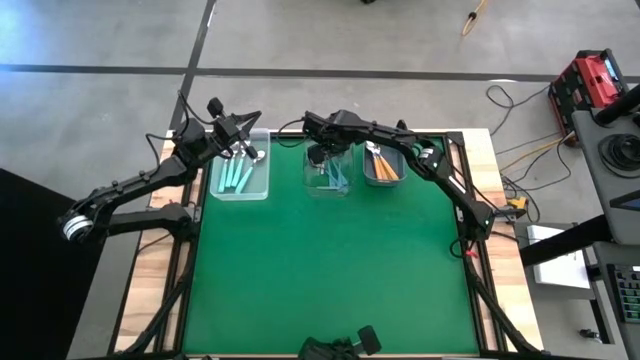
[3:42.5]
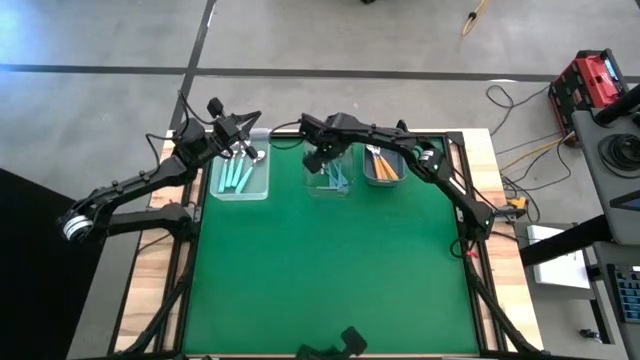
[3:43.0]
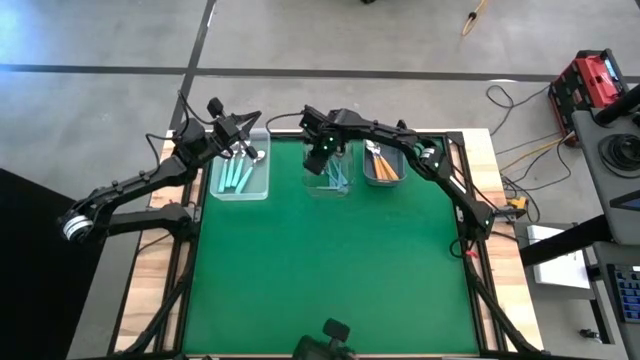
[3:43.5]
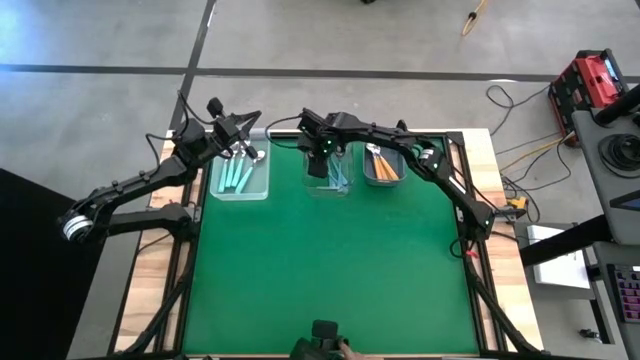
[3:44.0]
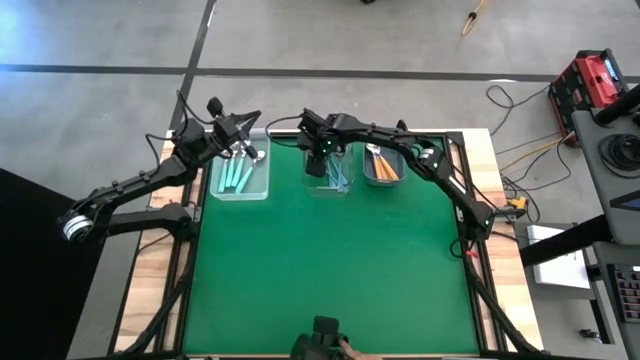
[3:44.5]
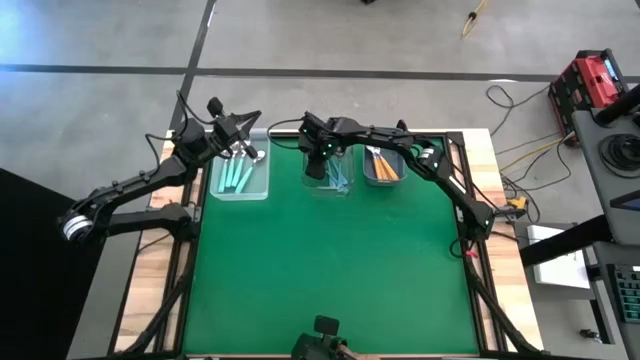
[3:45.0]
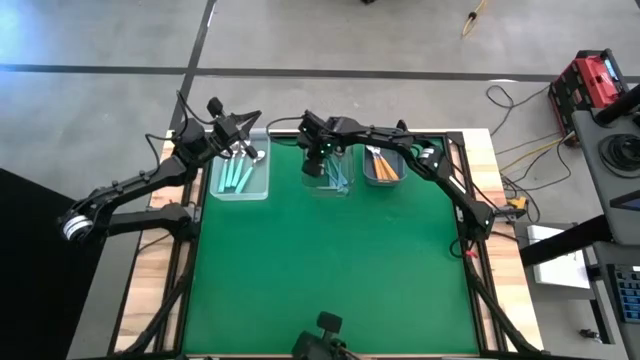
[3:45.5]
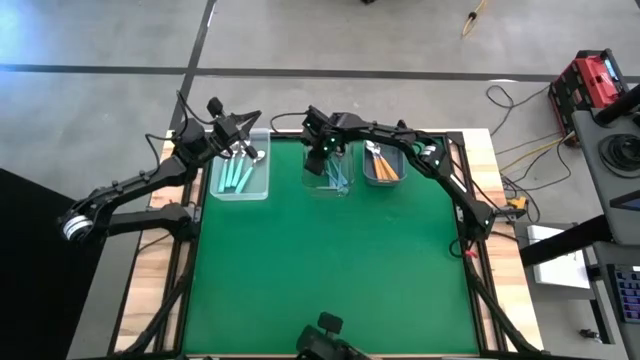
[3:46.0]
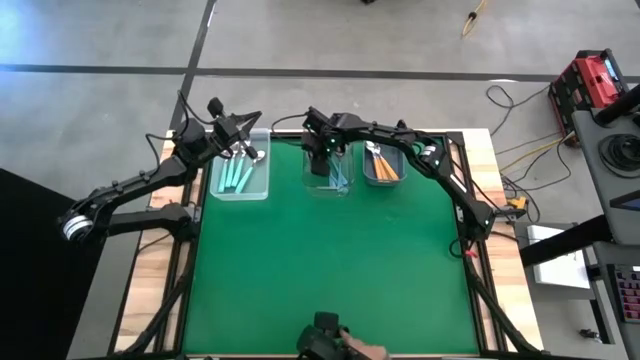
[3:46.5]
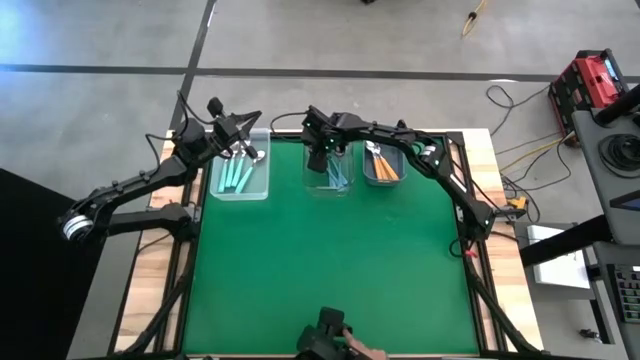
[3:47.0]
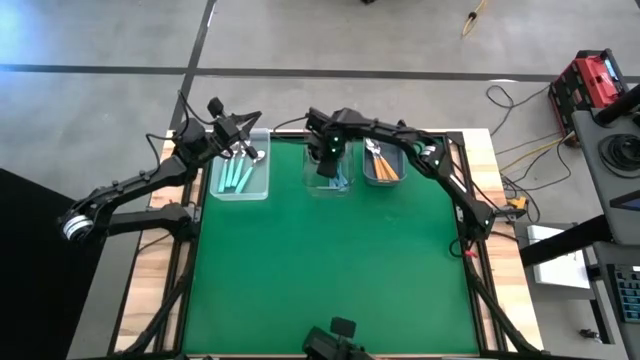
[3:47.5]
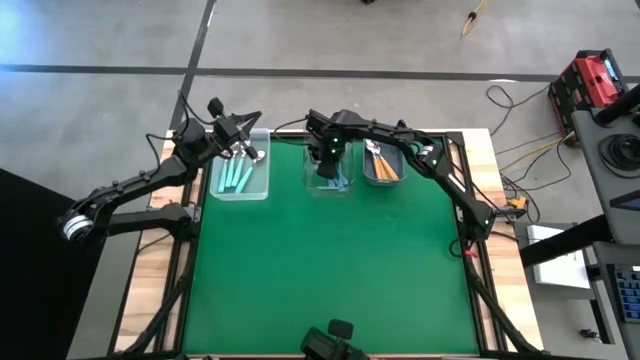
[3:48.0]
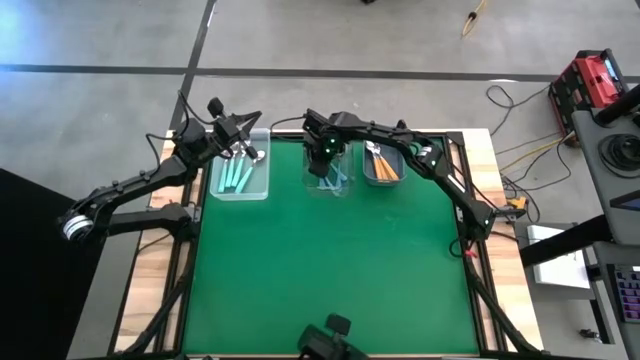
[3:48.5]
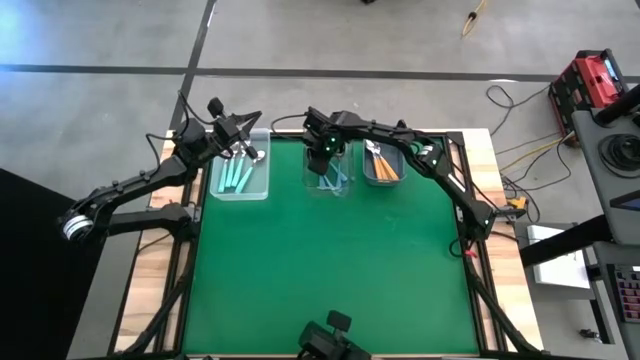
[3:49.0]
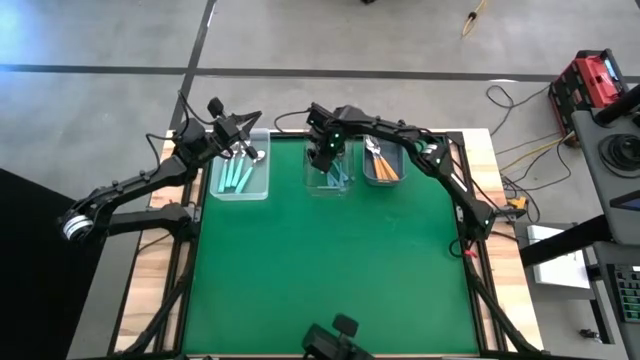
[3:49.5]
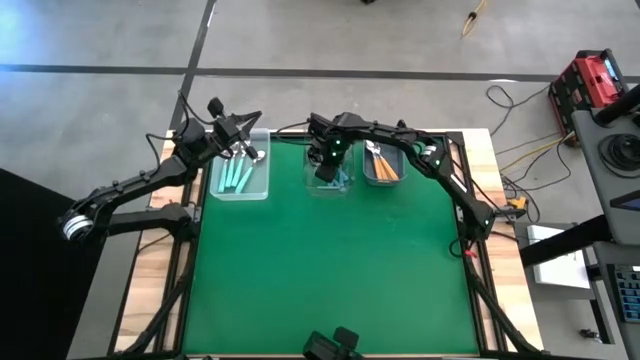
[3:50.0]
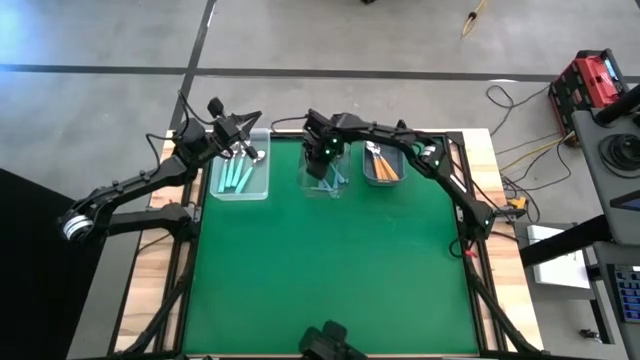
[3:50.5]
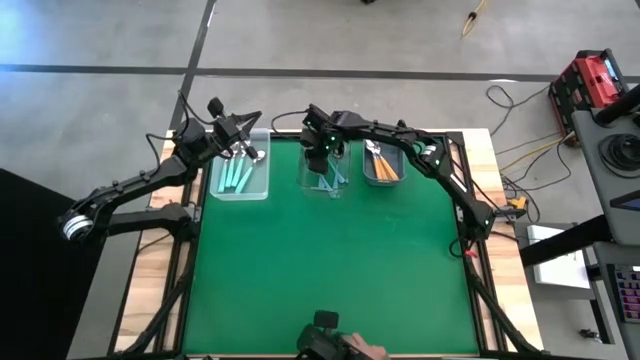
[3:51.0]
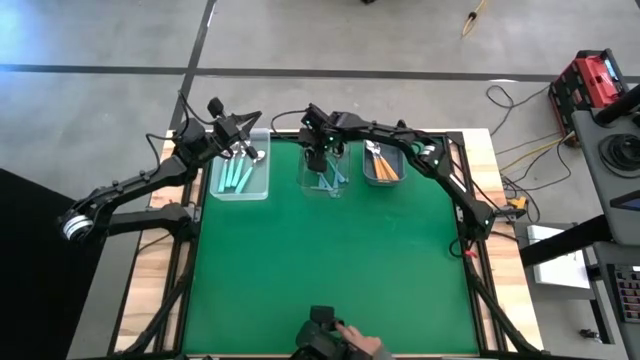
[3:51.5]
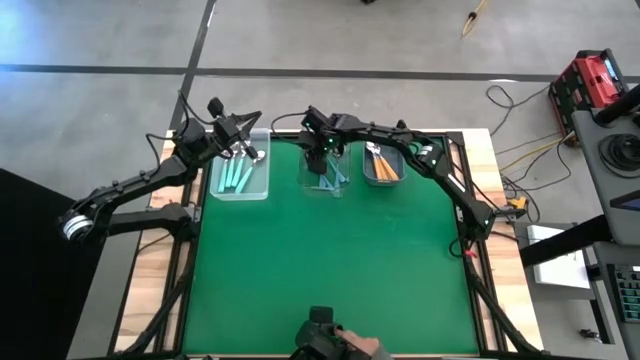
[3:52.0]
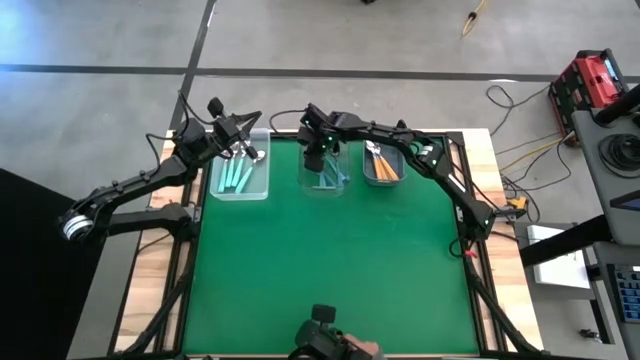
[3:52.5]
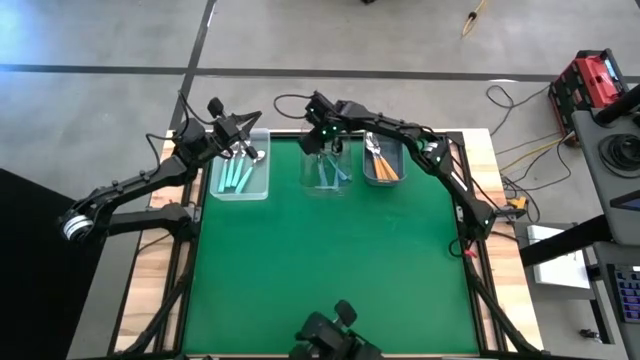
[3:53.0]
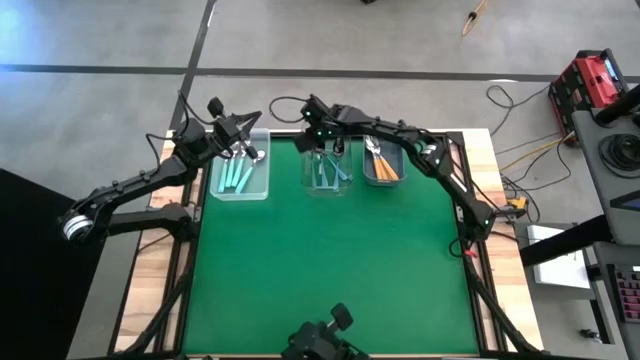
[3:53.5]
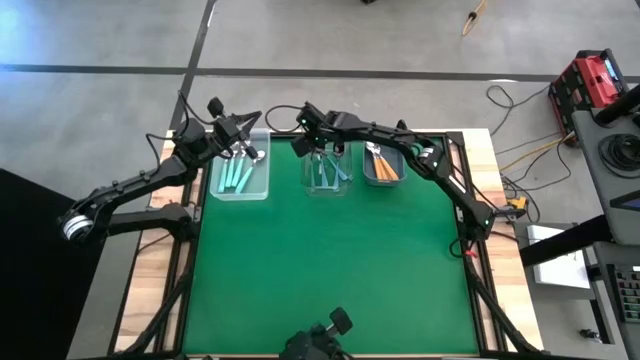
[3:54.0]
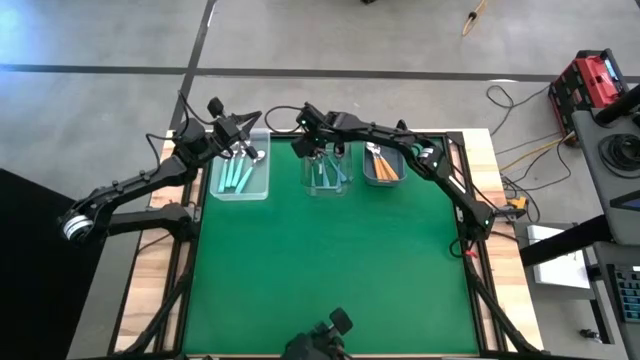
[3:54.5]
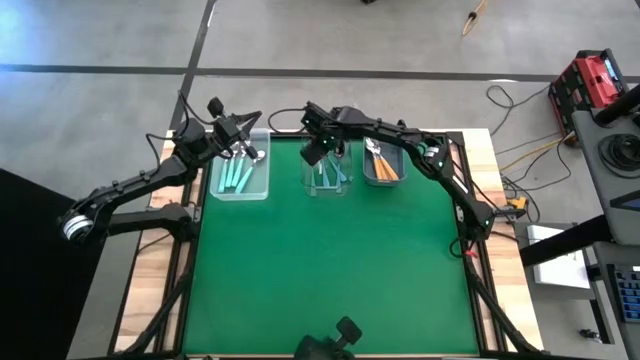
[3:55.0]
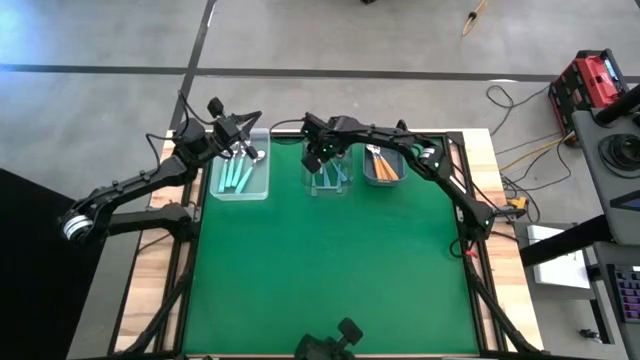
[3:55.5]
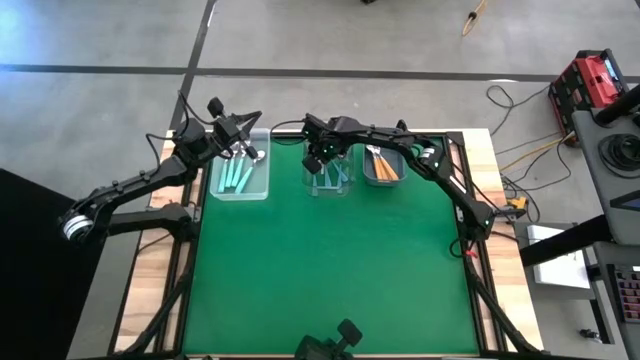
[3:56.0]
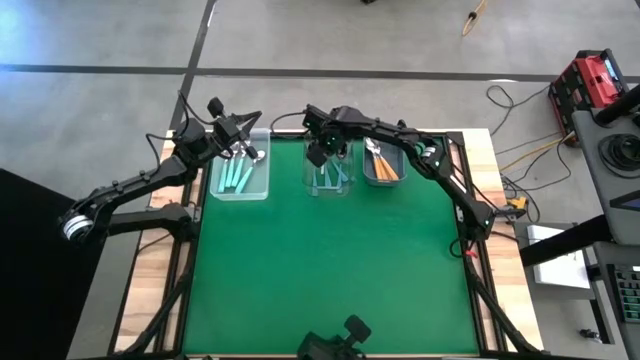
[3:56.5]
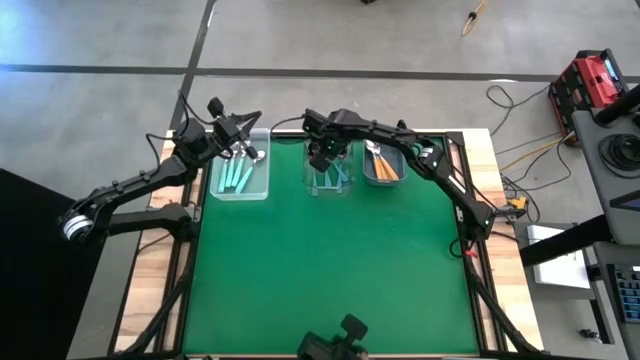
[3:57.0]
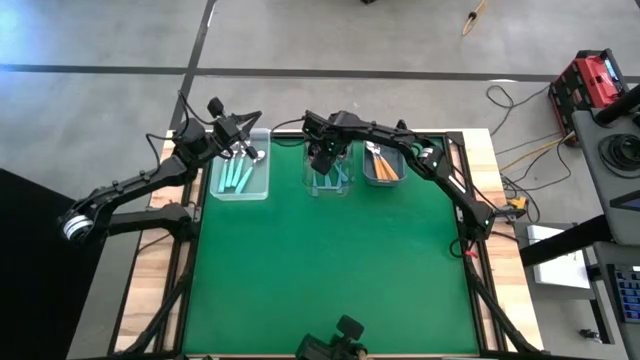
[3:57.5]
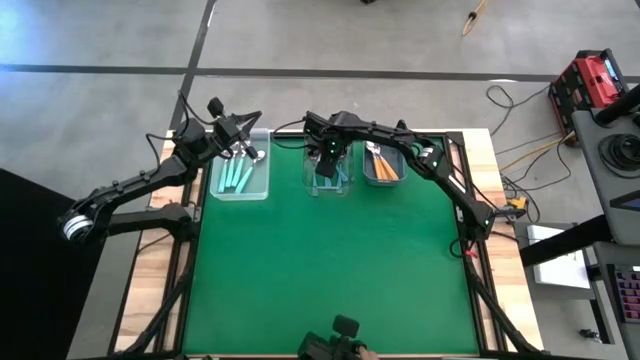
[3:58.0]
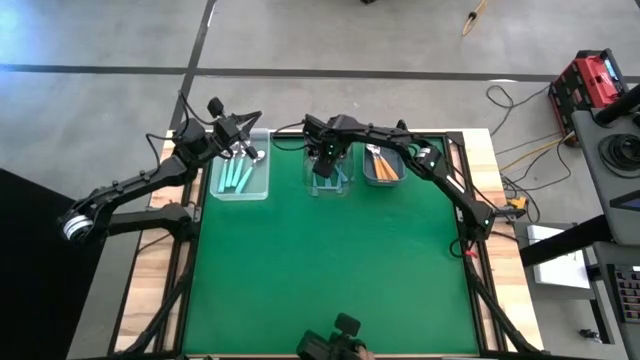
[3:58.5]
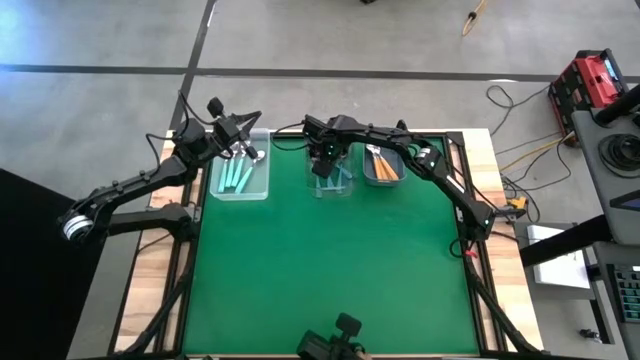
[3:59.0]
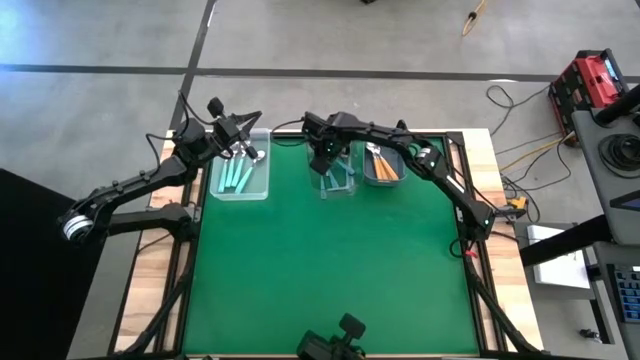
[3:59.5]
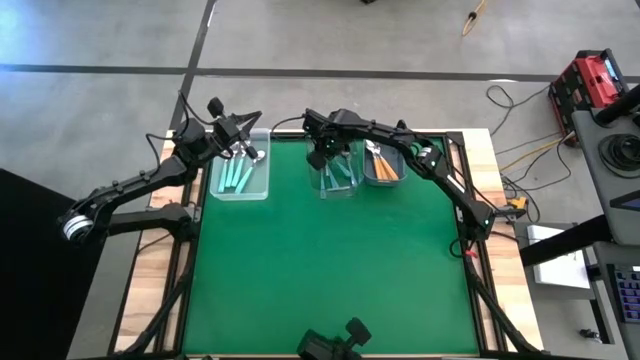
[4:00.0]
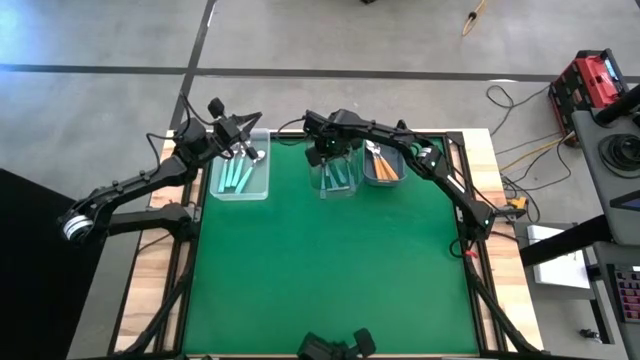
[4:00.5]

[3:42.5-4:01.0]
Task: Sort silverware by color (type)
Adjust the blue spoons in the transparent bin

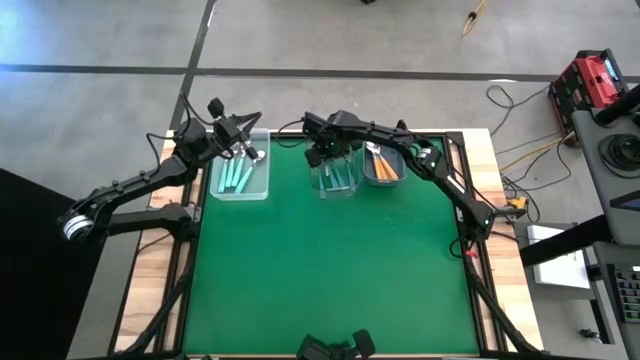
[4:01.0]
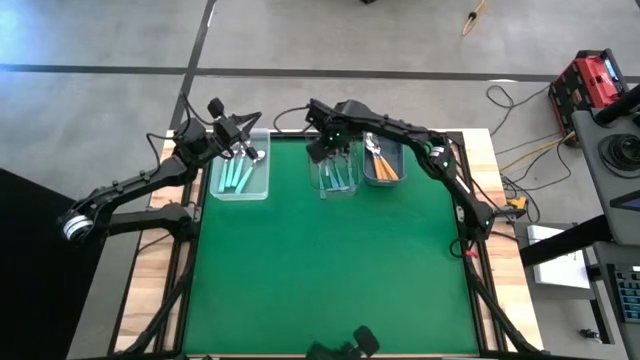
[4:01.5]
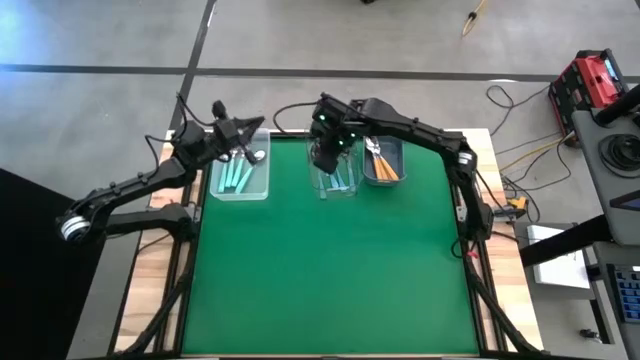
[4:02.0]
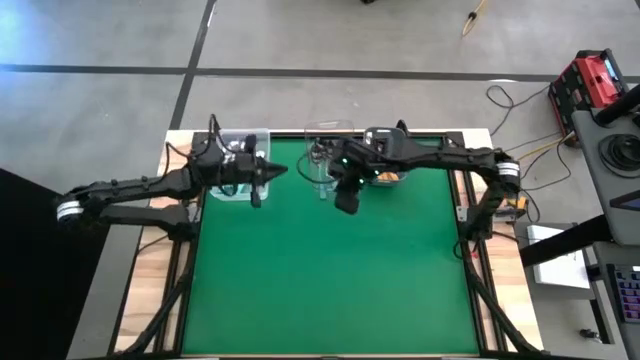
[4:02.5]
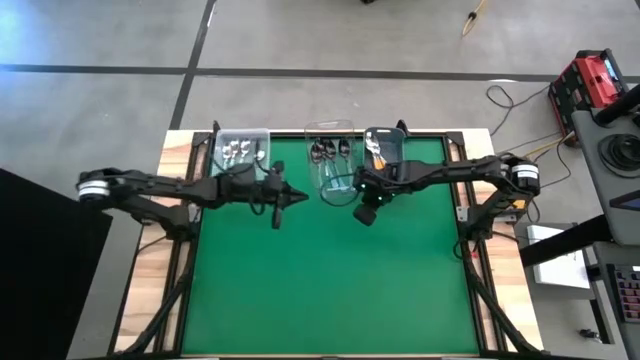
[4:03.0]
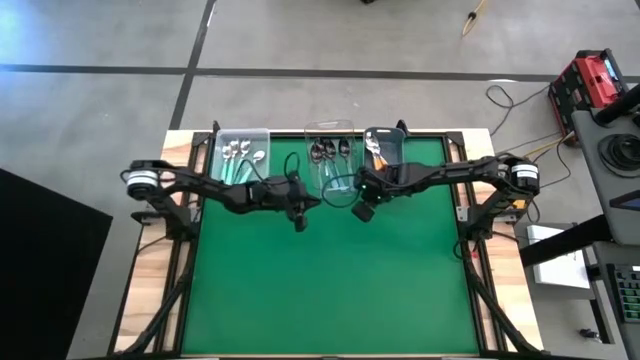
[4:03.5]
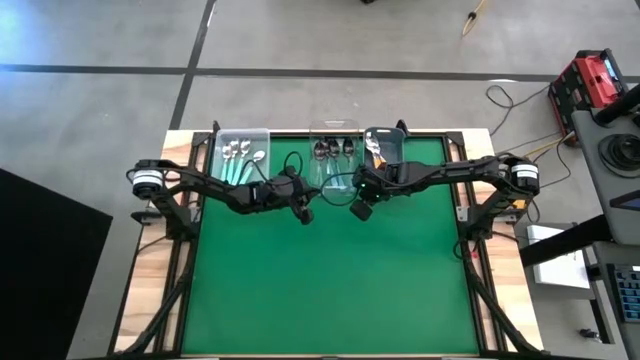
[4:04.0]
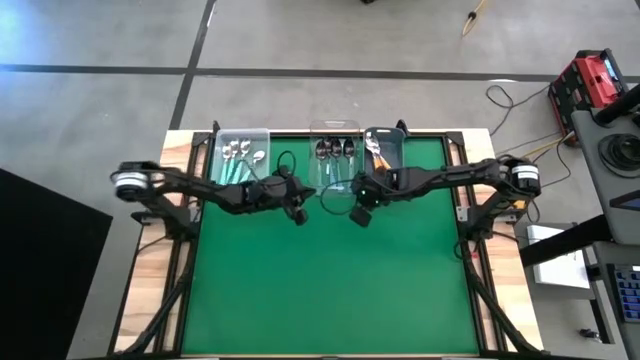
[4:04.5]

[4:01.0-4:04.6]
Adjust the transparent bin
